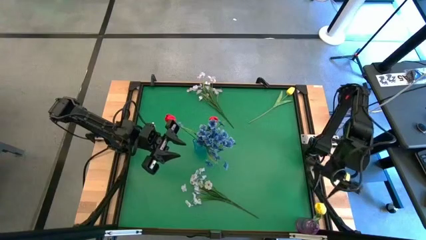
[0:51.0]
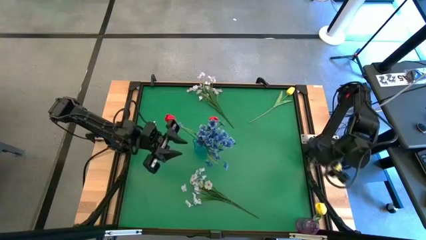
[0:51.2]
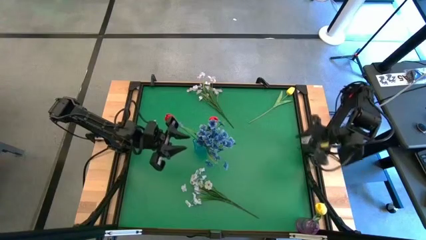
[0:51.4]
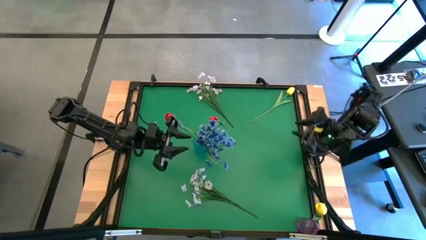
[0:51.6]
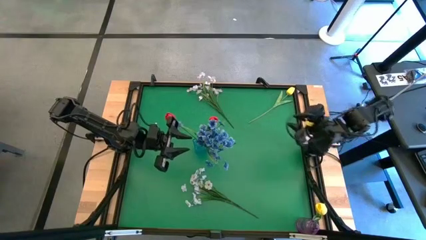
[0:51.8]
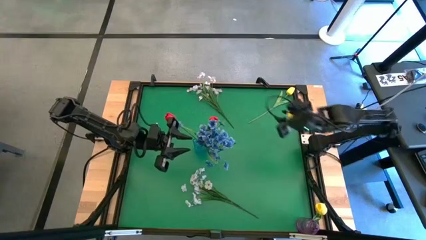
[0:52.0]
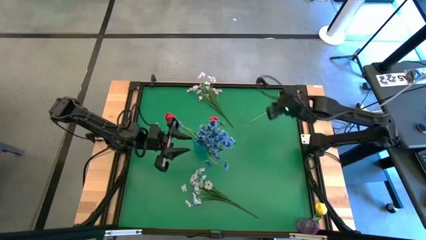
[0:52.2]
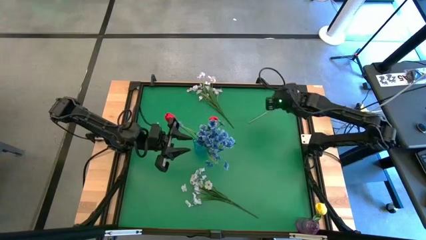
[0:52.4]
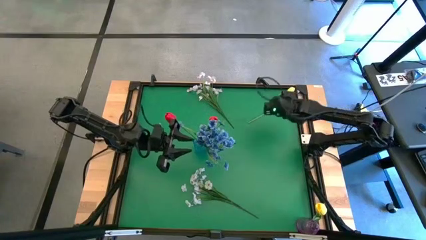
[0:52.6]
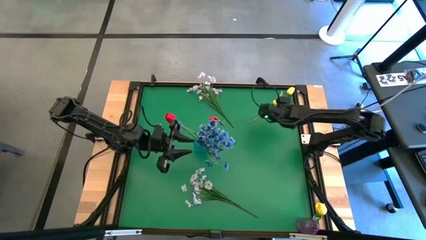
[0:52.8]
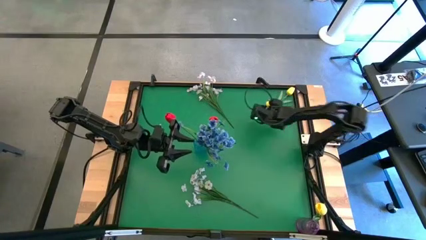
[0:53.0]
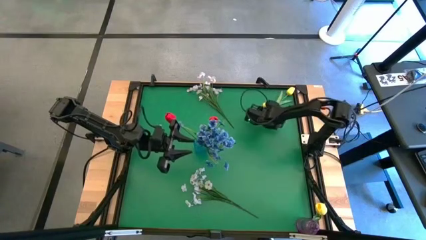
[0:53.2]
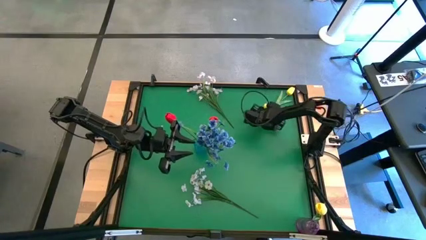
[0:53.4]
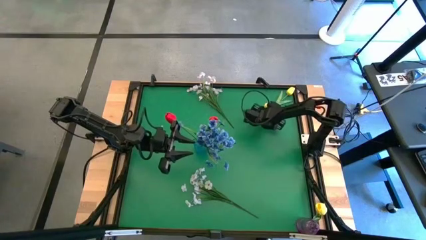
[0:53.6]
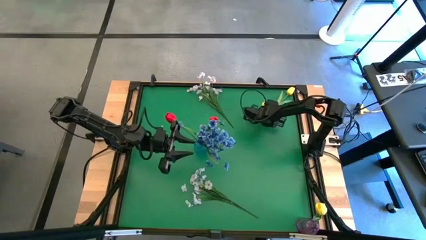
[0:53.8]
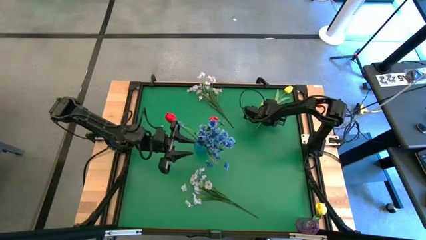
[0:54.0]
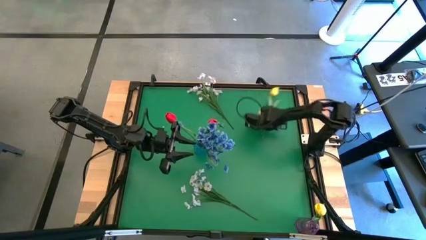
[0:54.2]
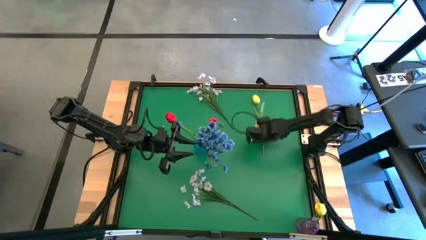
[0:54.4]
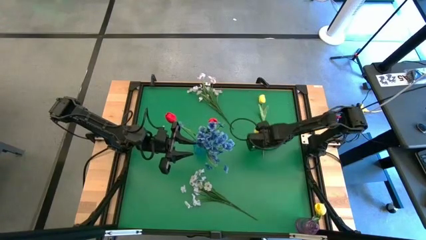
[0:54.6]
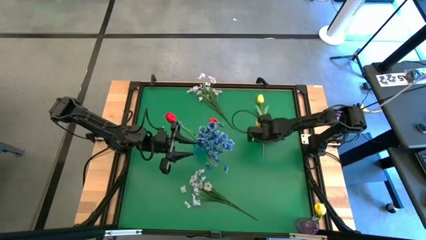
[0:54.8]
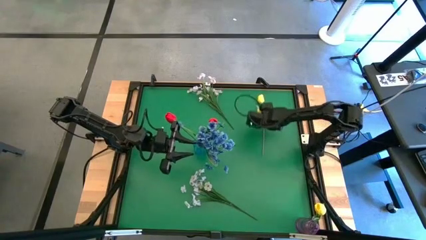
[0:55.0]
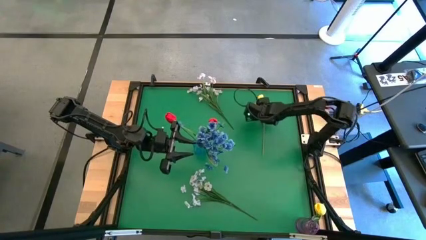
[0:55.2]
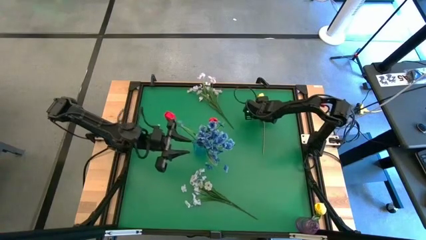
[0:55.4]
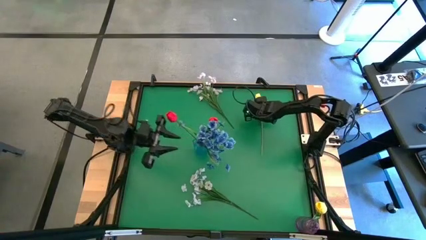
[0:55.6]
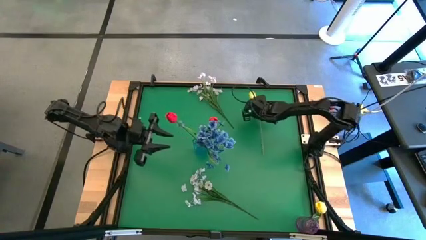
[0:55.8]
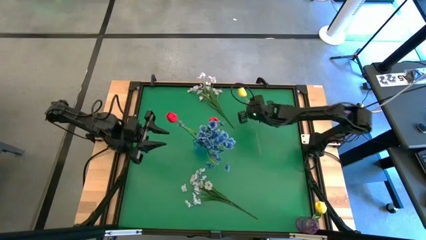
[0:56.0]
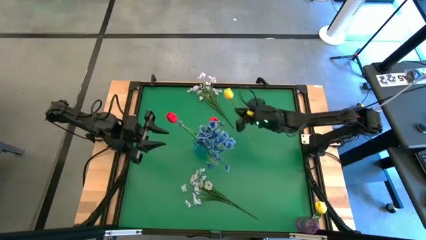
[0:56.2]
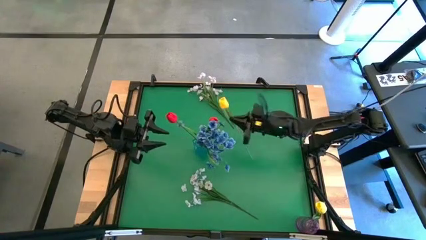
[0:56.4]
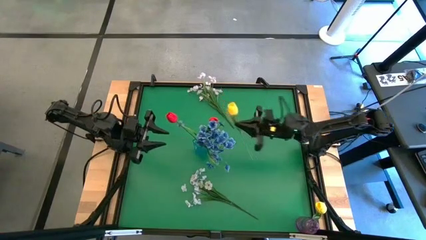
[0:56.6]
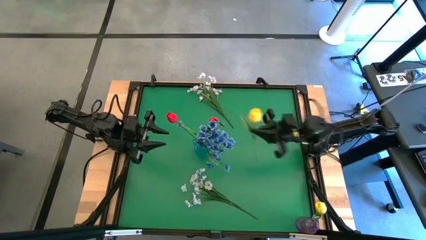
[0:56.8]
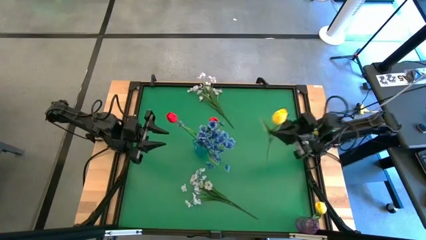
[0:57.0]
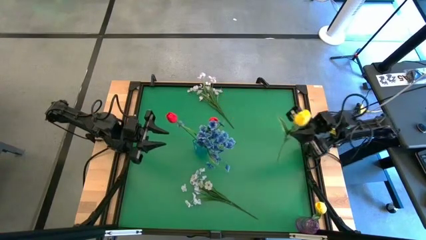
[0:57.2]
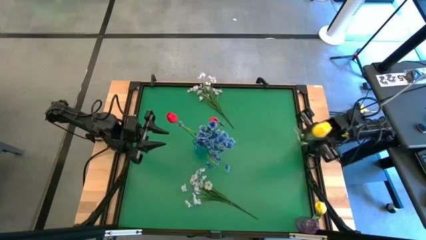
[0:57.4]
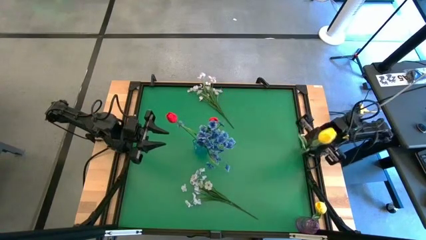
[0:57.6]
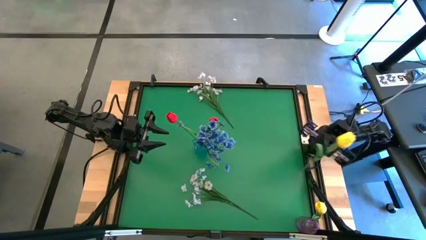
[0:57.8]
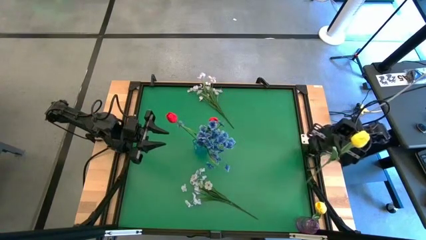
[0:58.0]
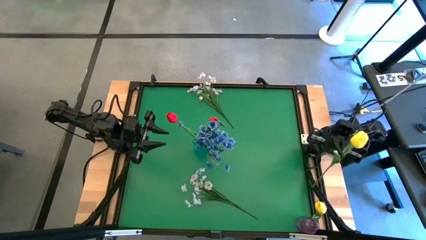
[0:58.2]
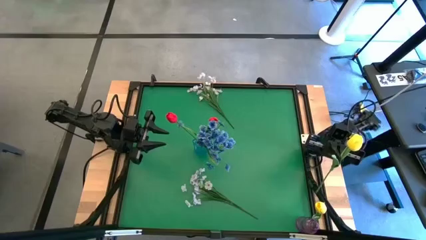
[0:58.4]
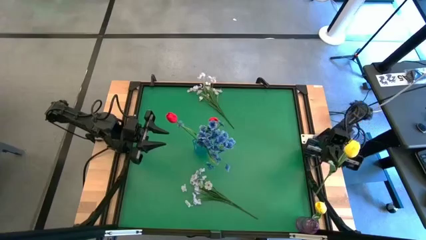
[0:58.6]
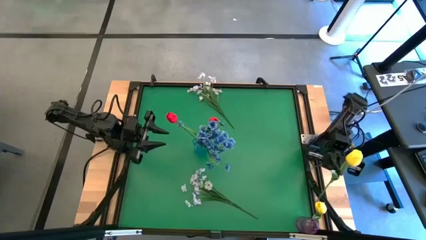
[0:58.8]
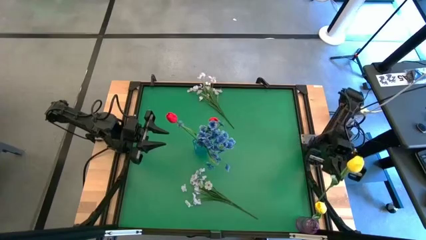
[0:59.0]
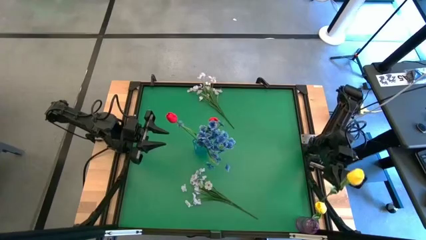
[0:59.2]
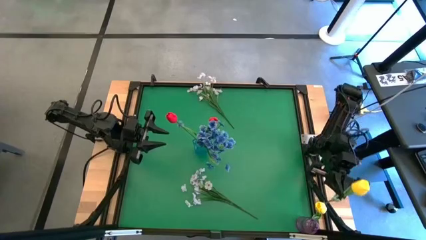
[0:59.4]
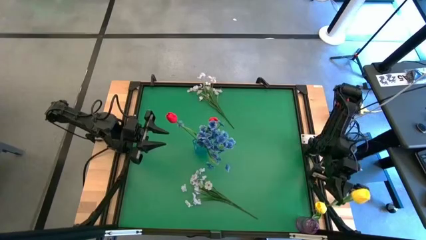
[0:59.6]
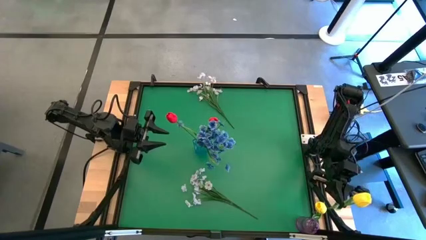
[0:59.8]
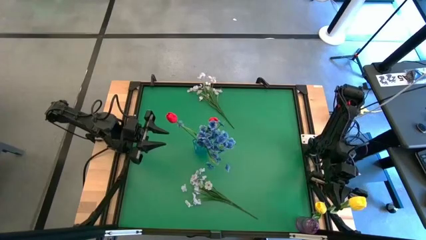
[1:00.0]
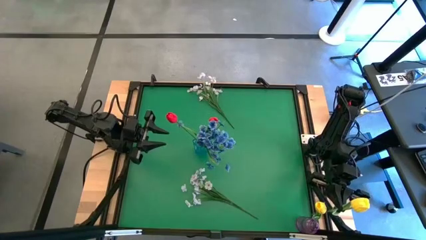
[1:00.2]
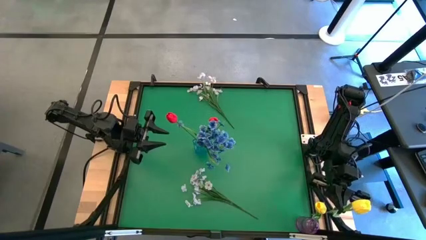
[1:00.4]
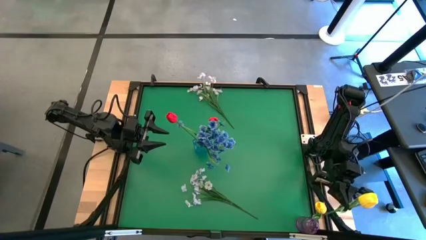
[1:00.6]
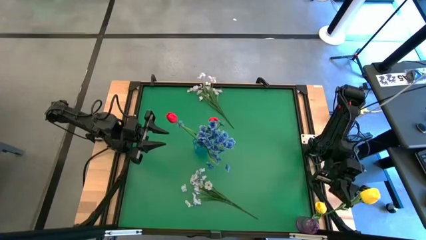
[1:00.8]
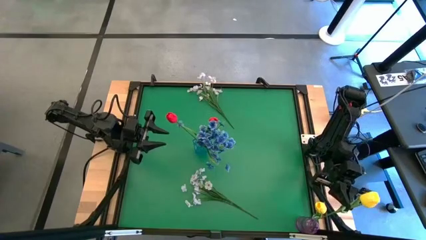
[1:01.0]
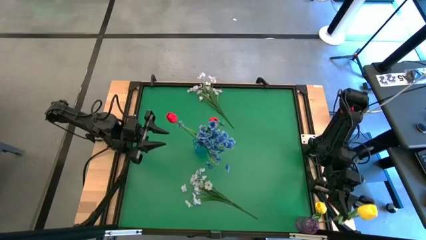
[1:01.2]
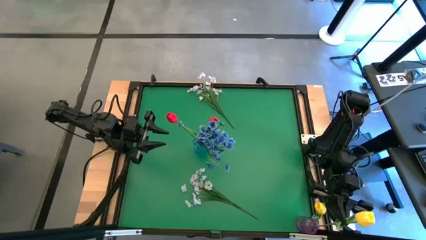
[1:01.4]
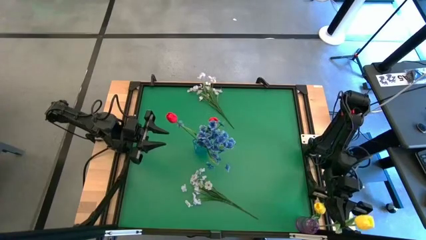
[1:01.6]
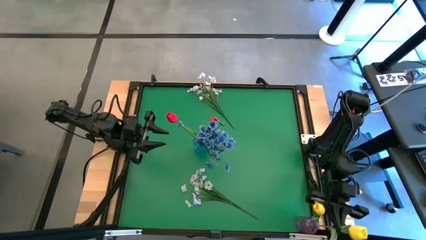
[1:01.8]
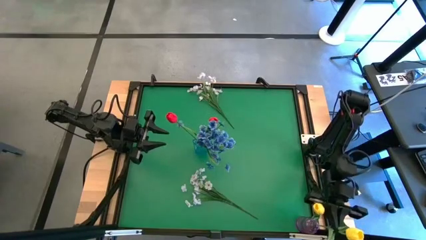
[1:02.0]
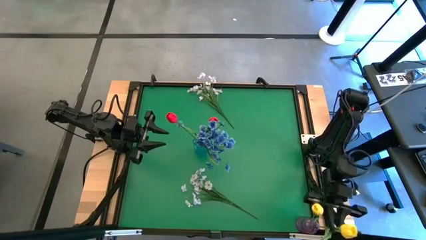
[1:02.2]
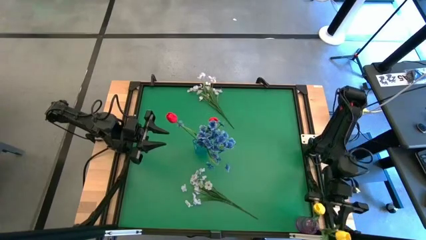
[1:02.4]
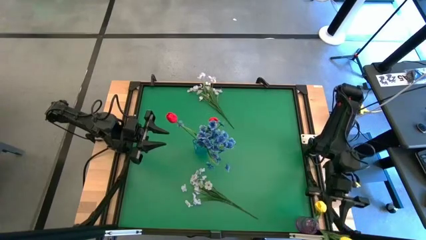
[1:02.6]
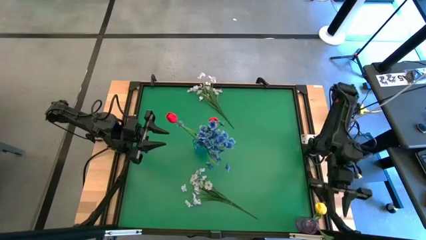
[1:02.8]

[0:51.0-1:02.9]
Task: Sort flowers into vase by color
Put the yellow flower into the purple vase
